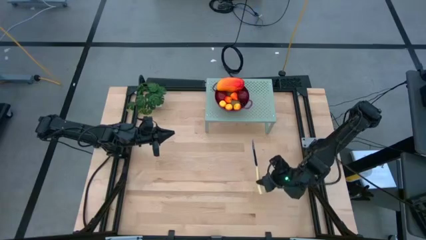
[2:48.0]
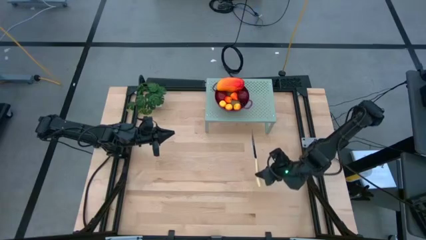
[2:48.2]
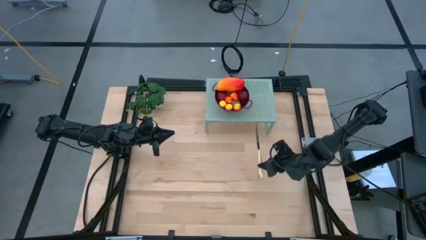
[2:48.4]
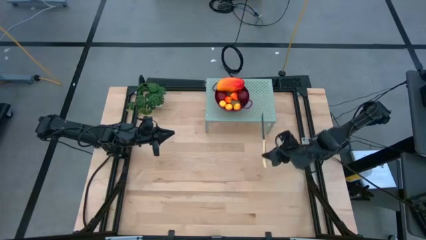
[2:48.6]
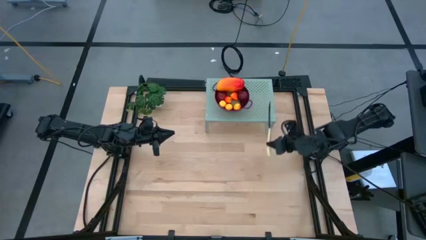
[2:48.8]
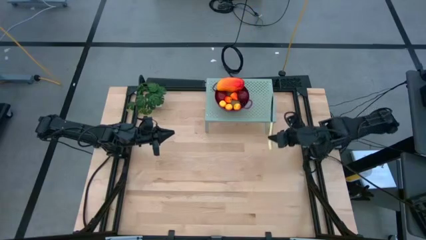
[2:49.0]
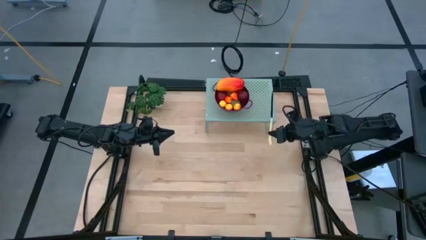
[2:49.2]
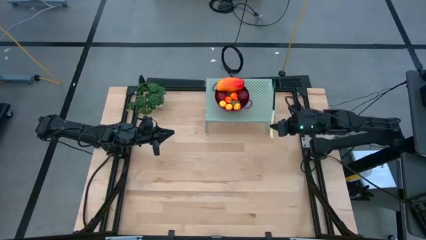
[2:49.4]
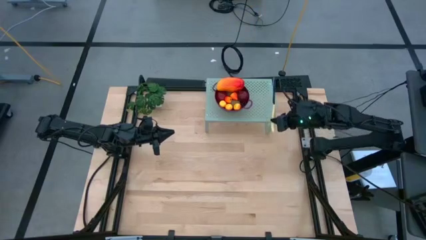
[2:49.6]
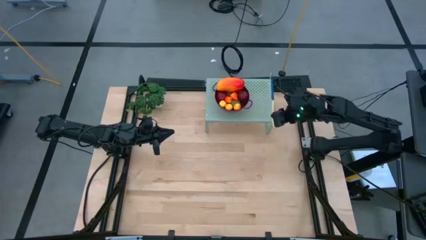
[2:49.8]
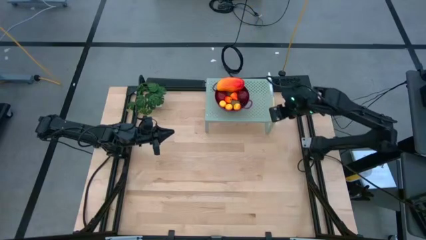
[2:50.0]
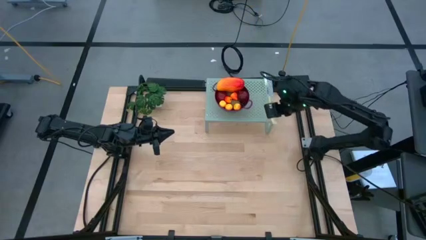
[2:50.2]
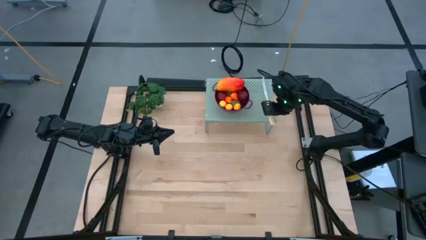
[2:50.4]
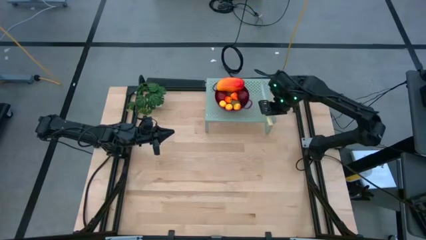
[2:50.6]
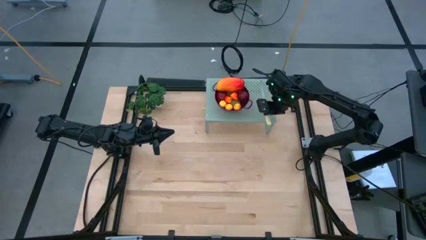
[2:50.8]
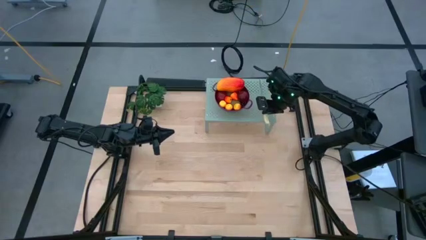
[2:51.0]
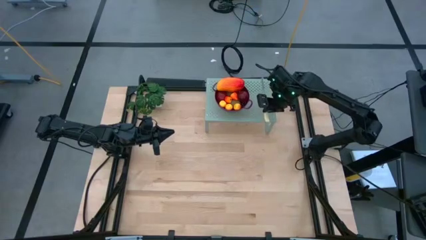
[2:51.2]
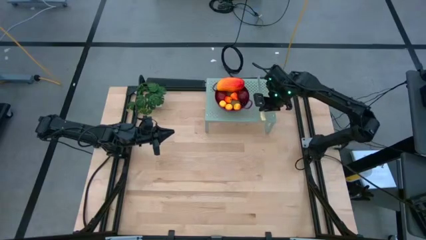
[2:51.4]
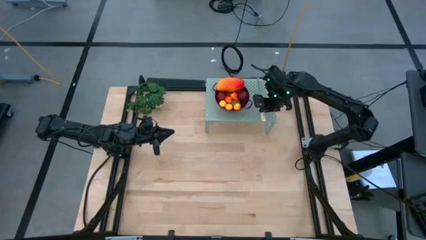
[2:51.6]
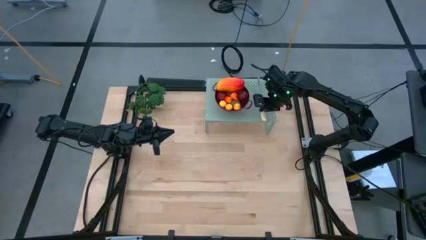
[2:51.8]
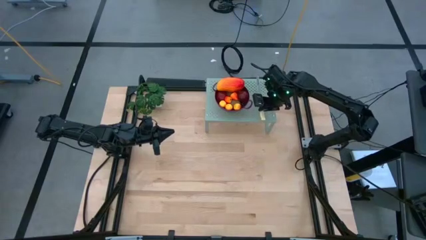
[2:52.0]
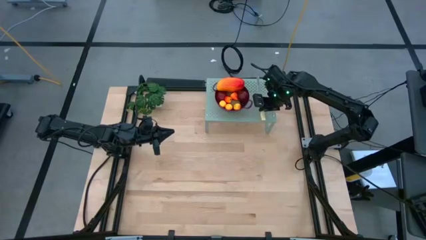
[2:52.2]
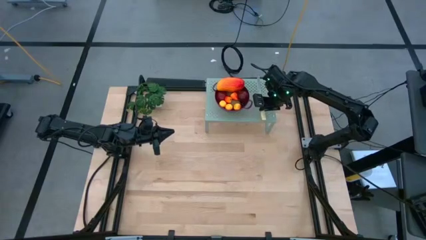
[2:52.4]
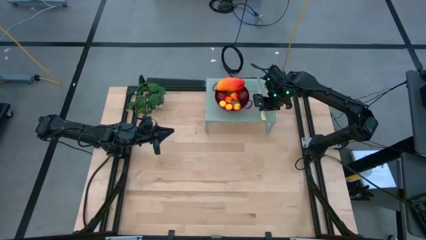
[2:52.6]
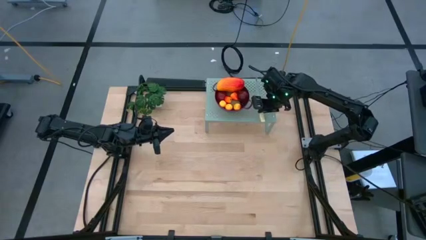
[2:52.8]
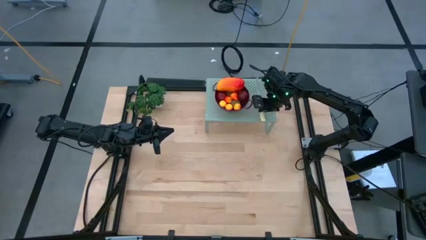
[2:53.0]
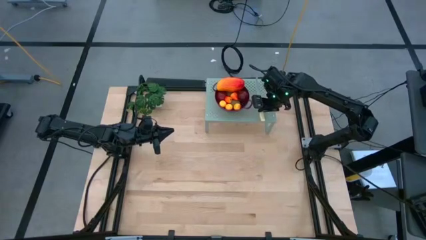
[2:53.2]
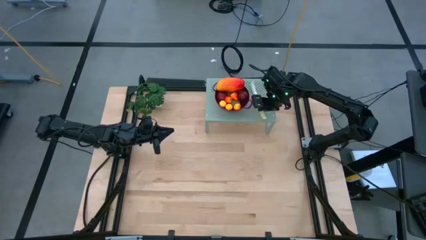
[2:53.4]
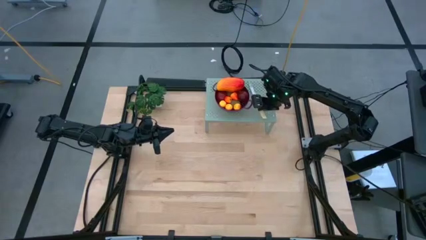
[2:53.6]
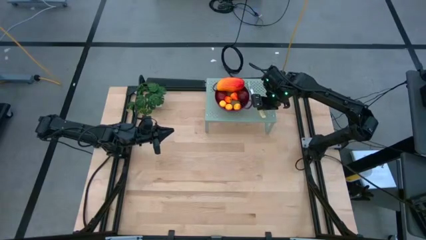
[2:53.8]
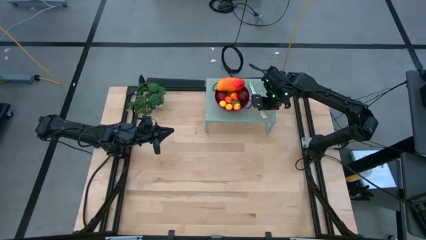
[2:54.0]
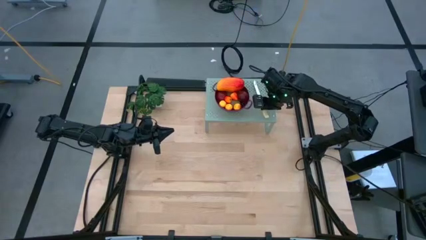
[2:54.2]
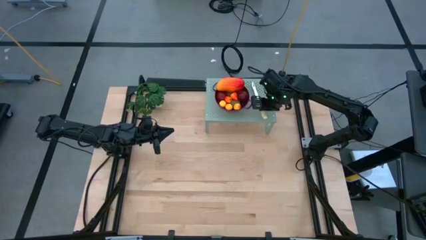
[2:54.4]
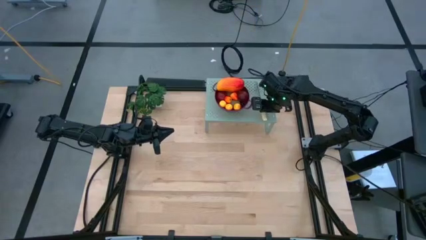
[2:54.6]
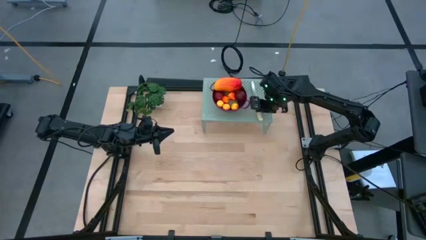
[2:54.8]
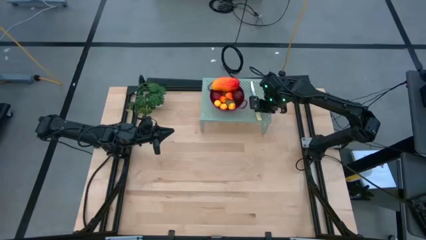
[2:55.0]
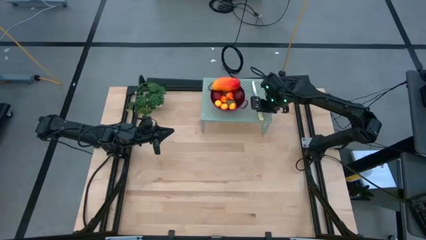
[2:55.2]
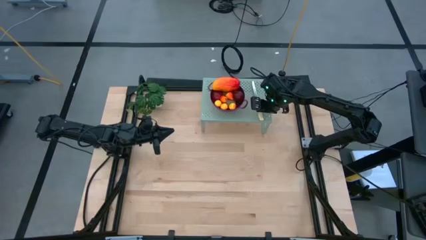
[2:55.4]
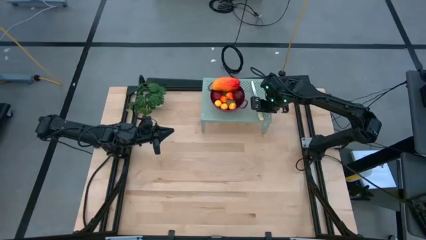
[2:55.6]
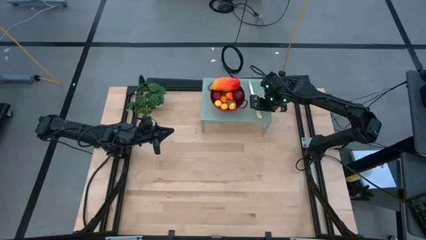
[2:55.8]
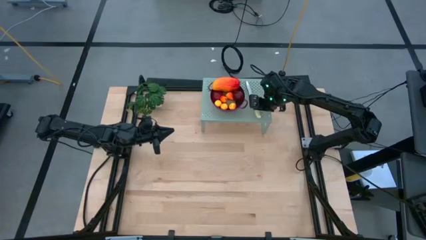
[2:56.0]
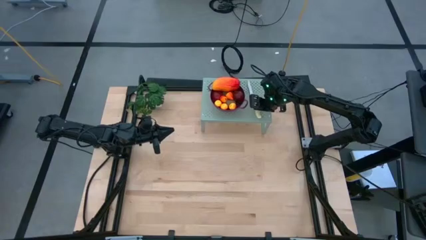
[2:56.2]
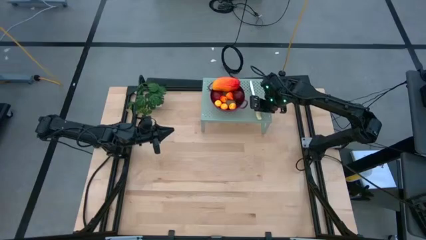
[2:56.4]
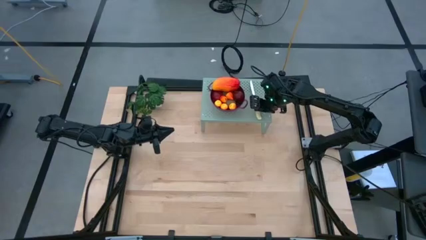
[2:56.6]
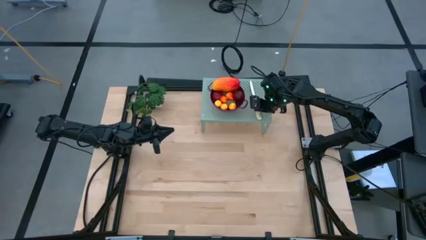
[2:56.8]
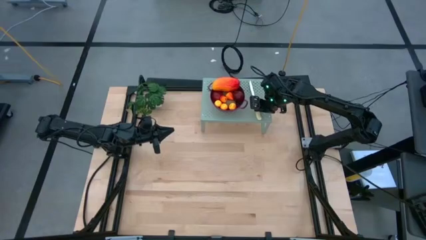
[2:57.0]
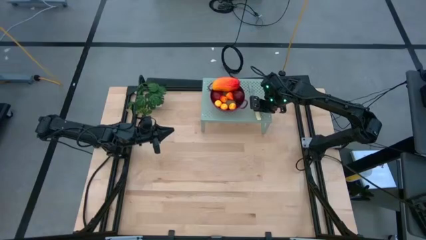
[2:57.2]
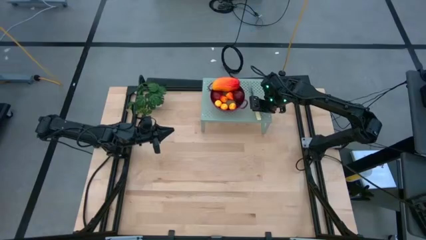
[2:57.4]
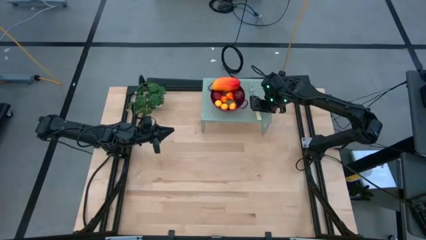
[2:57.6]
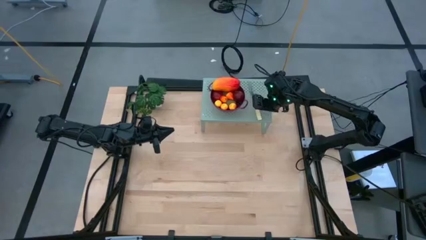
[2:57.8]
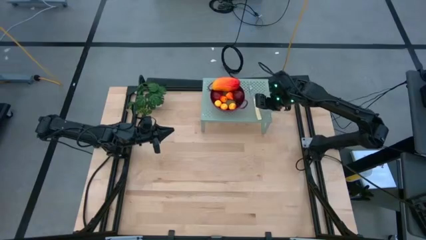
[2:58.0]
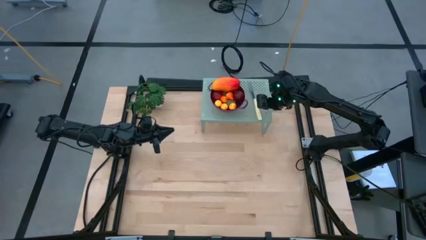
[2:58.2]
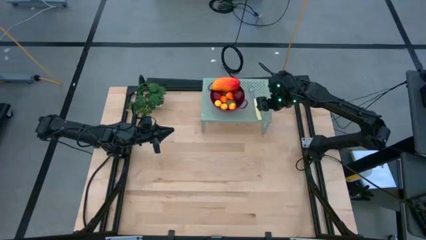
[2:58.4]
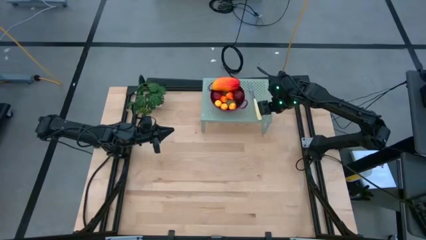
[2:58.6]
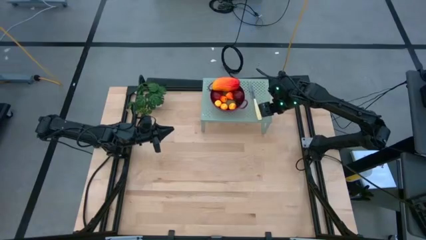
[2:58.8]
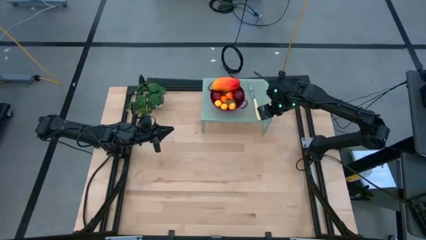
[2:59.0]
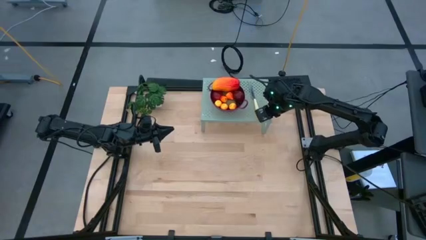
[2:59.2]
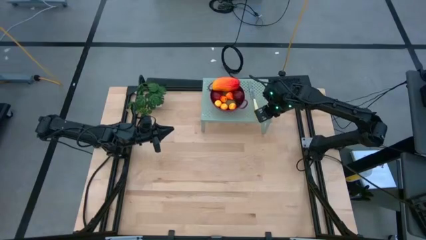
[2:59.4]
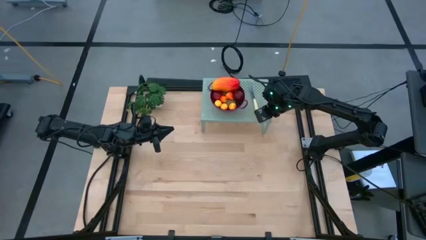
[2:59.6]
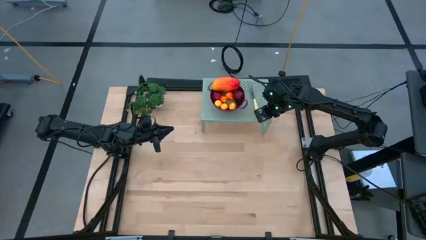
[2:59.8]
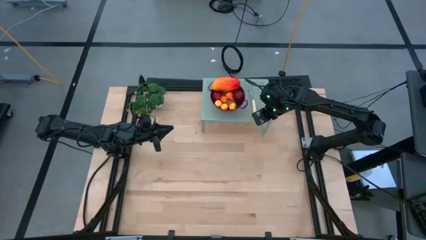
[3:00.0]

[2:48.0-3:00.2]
Task: Pick & Place Fruit
Put the knife on the shelf on the right of the strainer bowl

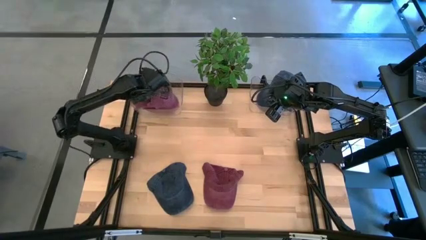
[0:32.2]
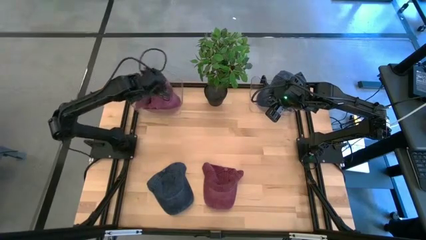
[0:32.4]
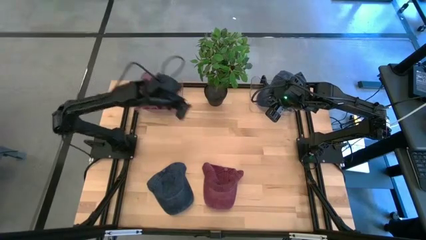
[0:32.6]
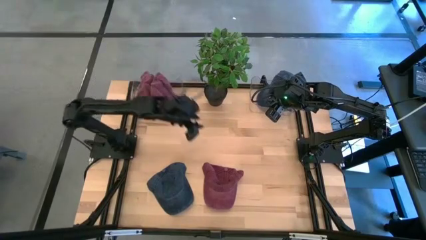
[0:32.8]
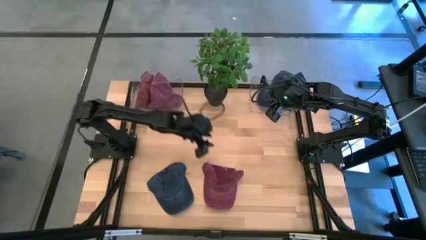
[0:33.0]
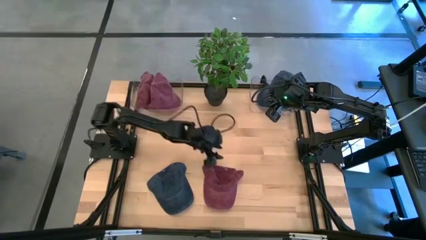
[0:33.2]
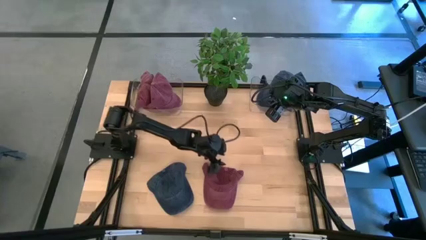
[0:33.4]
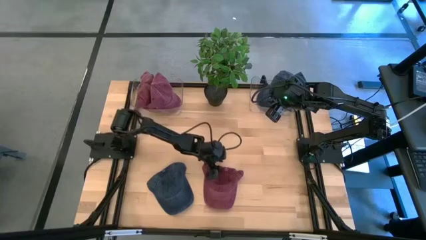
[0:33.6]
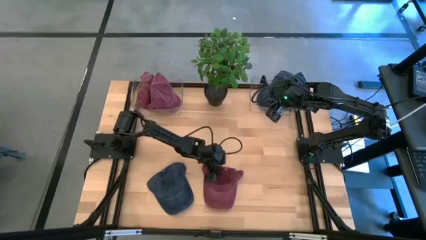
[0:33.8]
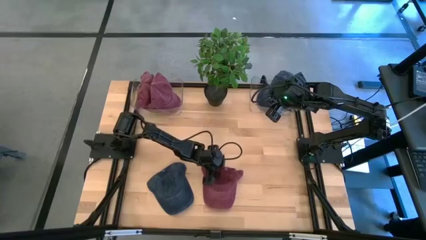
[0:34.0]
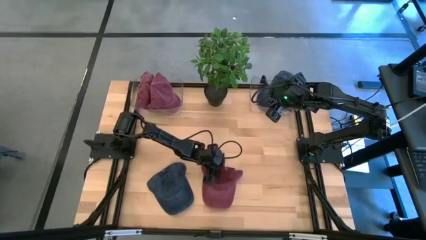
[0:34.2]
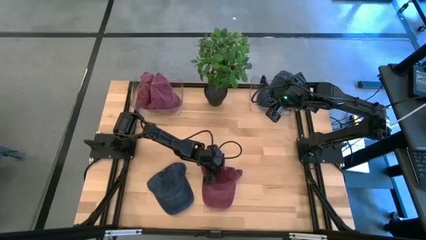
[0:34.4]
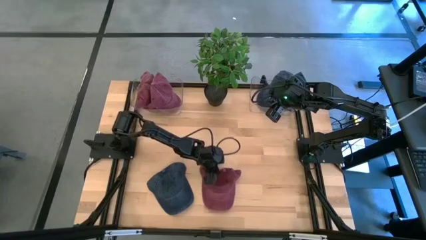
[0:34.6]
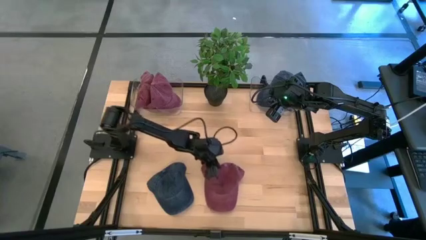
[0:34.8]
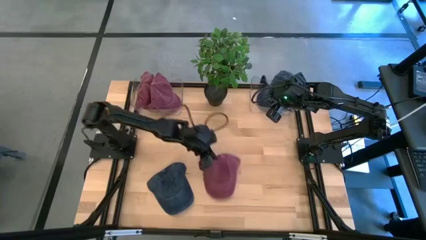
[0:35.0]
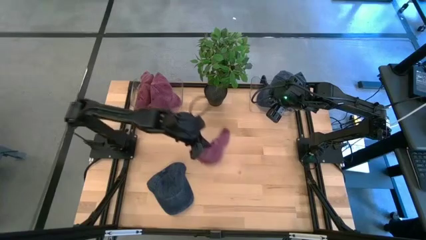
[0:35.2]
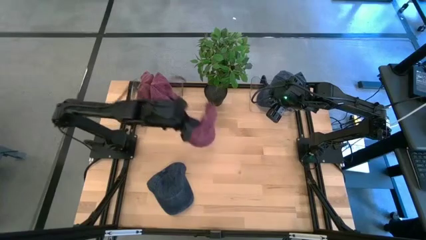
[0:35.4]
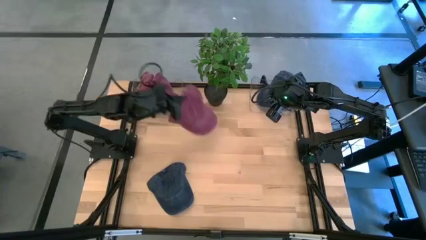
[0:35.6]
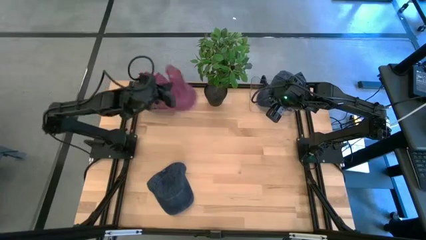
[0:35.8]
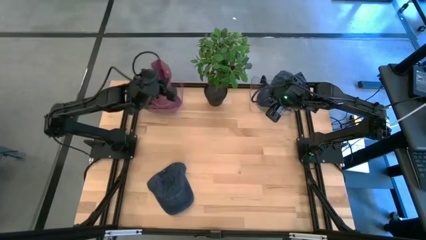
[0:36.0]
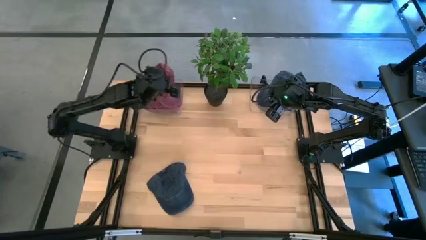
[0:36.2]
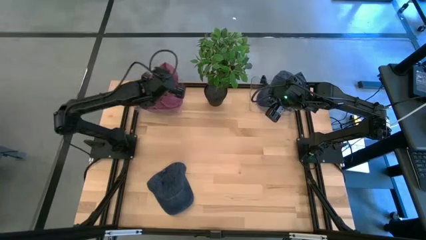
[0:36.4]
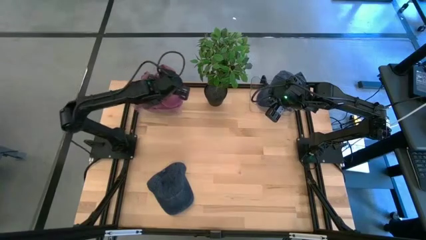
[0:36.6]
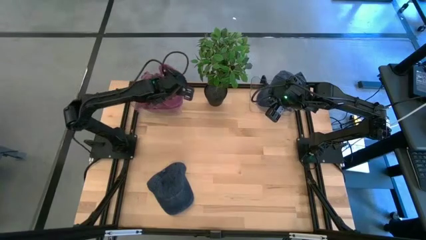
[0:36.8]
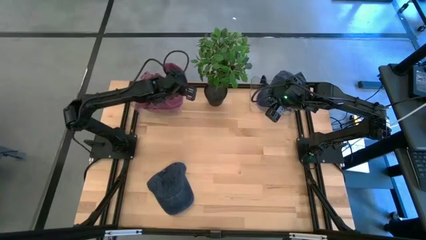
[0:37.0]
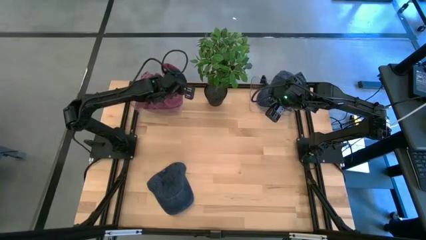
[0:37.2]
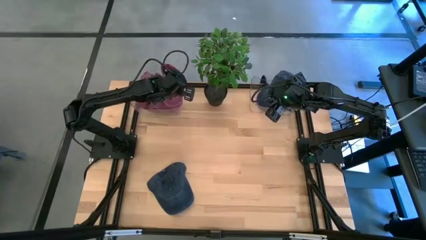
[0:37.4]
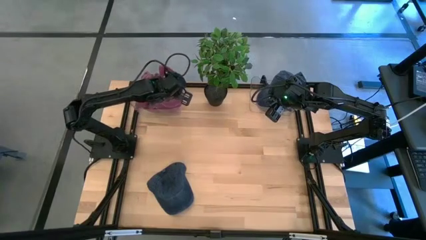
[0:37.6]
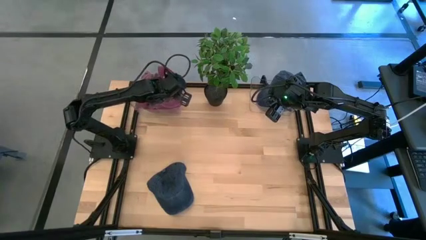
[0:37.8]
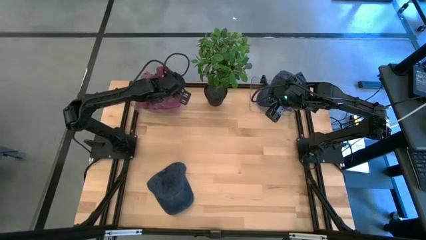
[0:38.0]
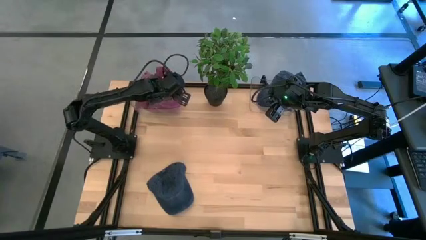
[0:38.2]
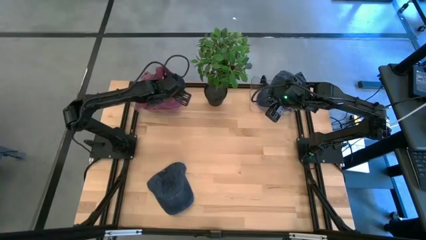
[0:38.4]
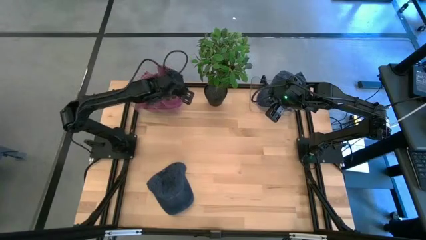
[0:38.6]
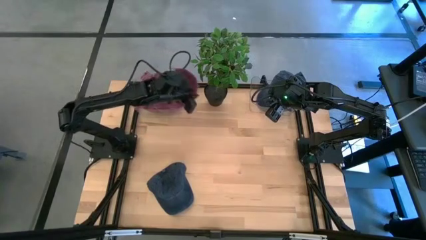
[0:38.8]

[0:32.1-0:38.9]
Task: Pick & Place hat
Put the red cap into the left transparent bin
